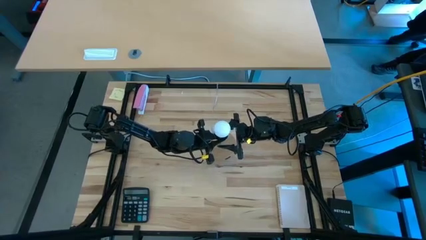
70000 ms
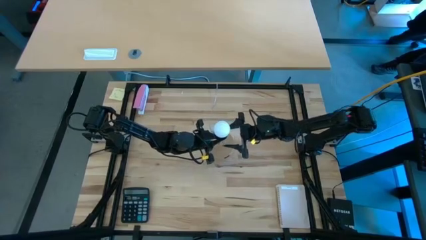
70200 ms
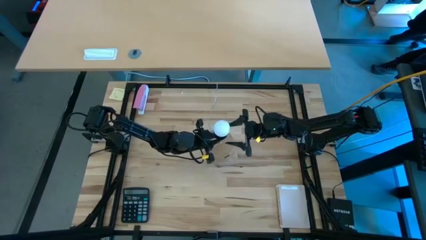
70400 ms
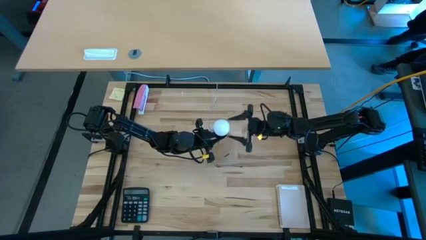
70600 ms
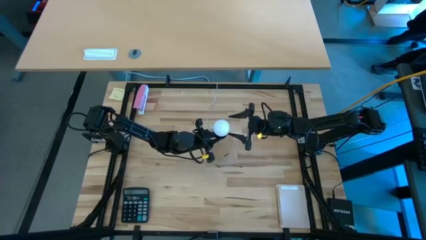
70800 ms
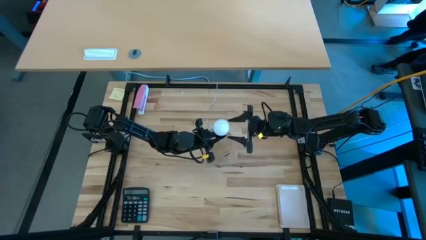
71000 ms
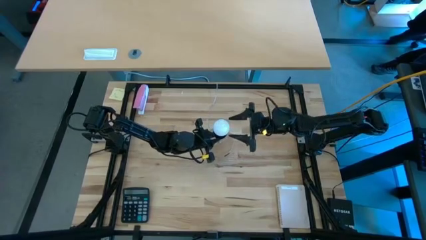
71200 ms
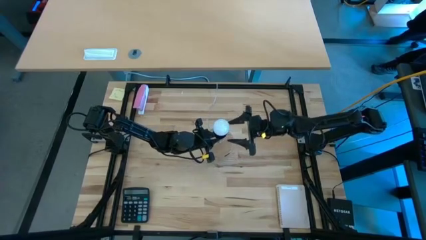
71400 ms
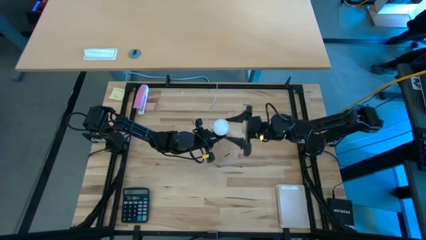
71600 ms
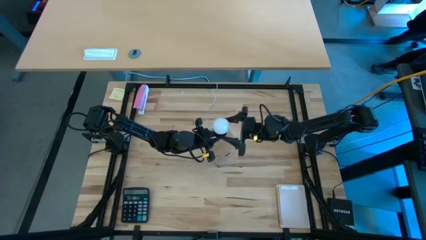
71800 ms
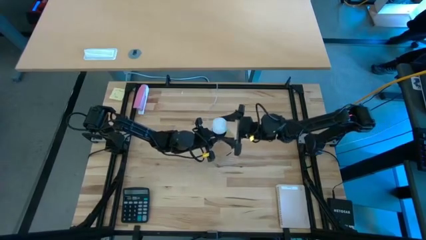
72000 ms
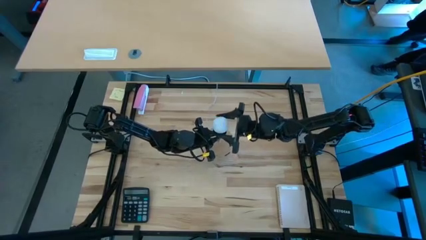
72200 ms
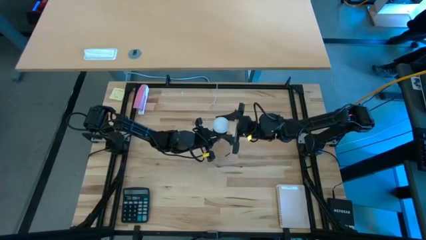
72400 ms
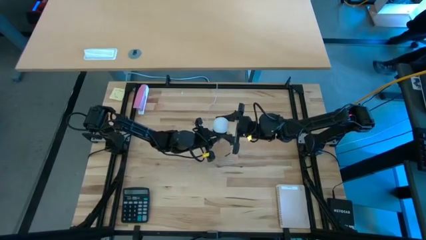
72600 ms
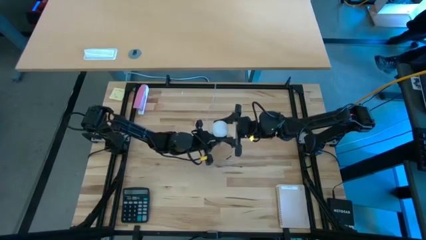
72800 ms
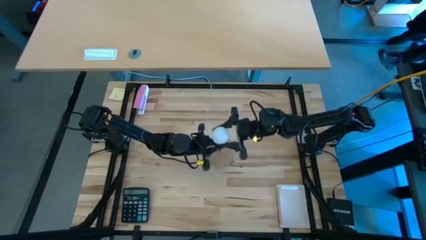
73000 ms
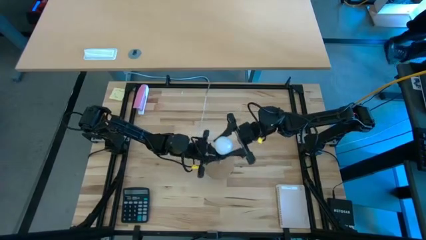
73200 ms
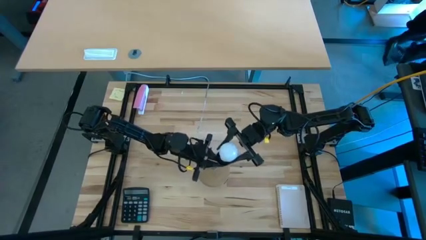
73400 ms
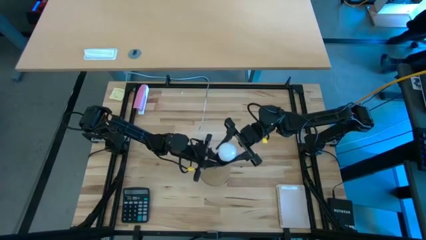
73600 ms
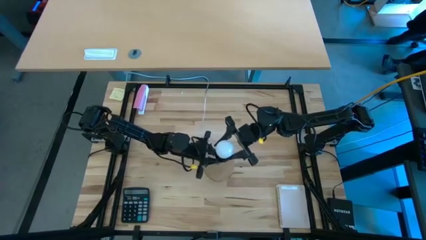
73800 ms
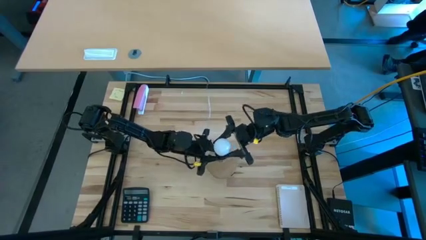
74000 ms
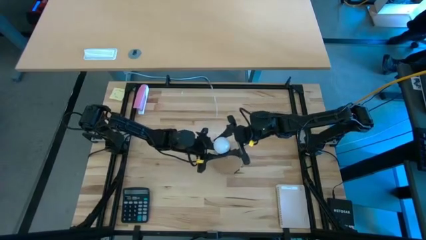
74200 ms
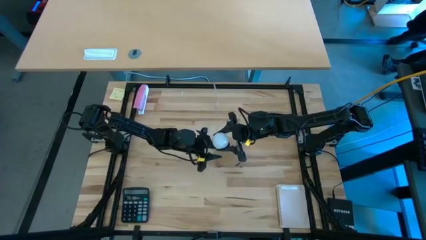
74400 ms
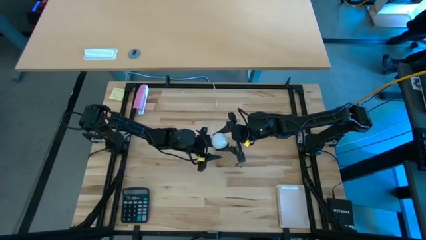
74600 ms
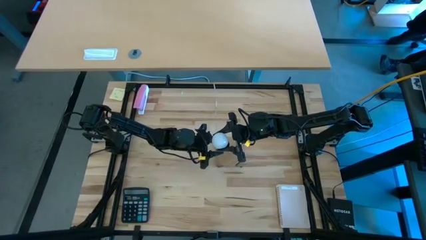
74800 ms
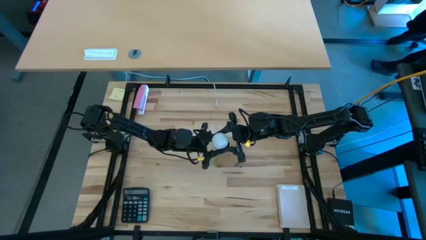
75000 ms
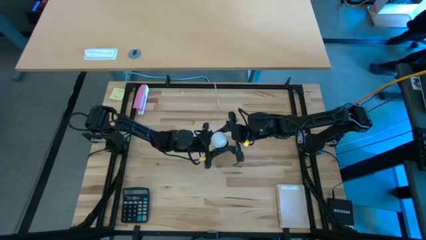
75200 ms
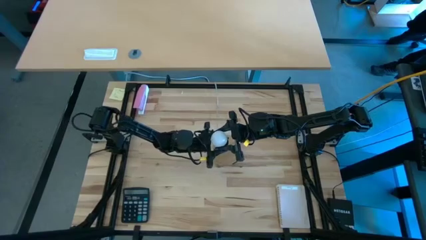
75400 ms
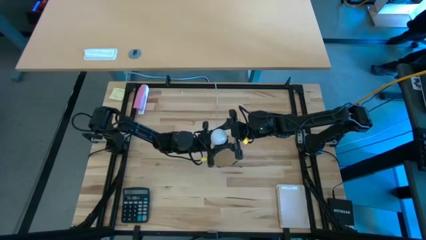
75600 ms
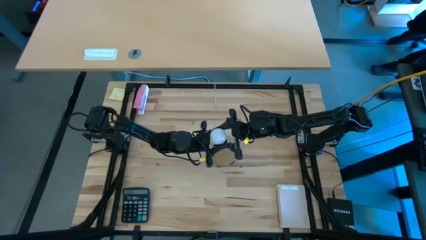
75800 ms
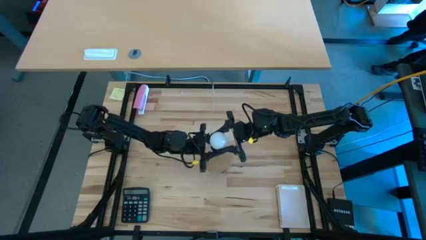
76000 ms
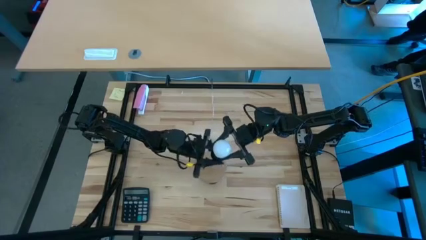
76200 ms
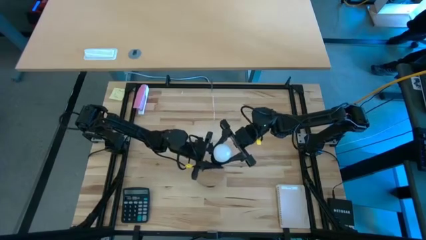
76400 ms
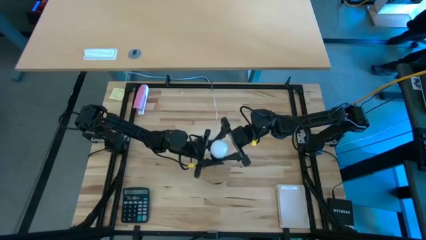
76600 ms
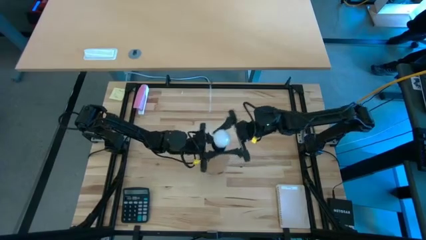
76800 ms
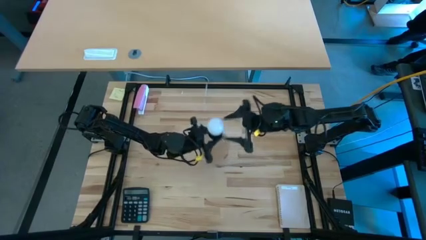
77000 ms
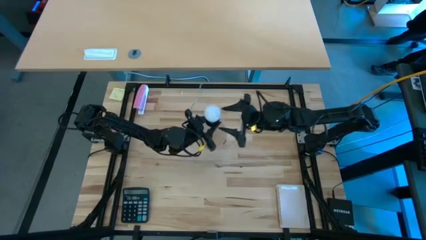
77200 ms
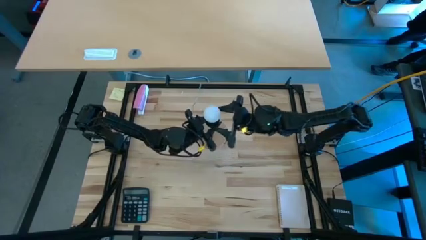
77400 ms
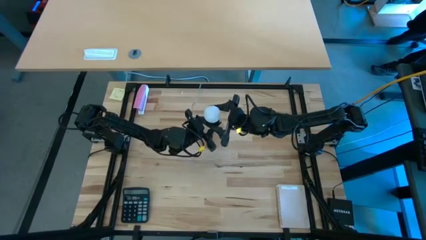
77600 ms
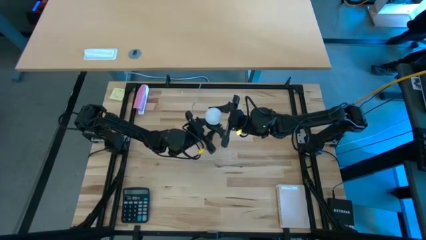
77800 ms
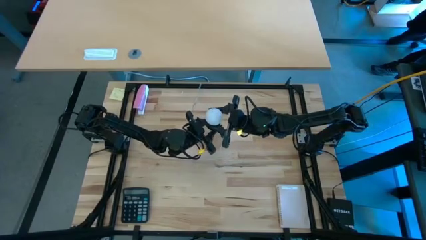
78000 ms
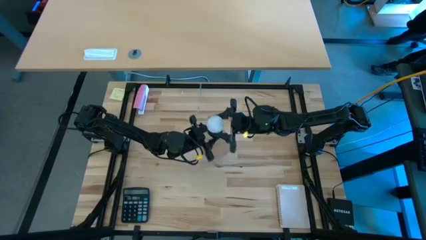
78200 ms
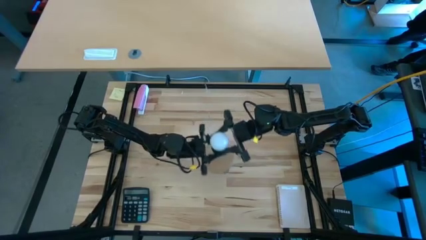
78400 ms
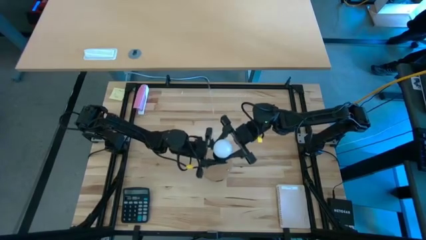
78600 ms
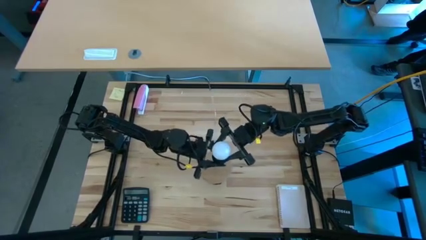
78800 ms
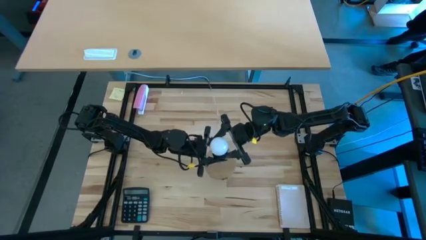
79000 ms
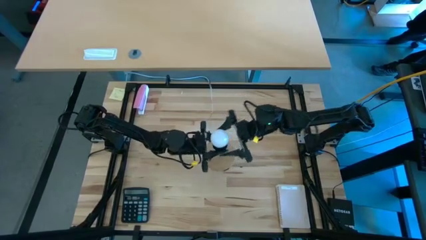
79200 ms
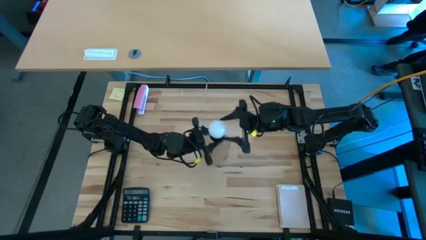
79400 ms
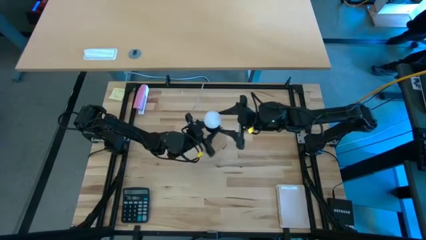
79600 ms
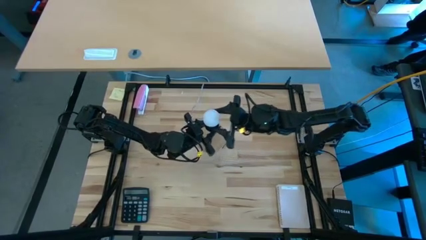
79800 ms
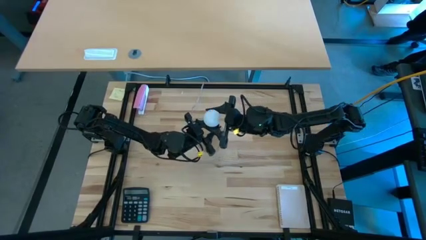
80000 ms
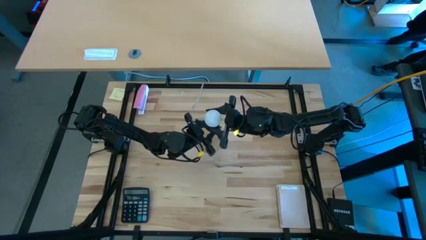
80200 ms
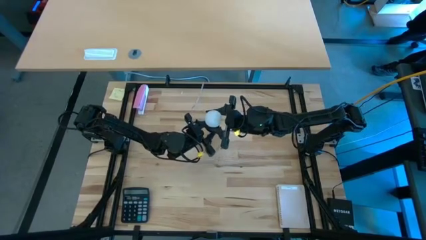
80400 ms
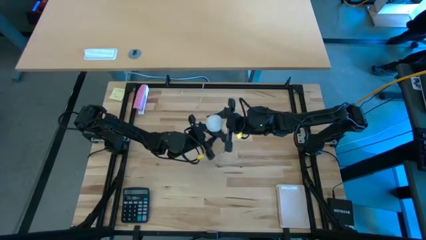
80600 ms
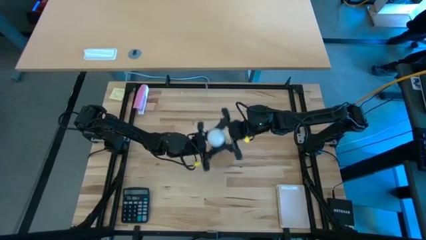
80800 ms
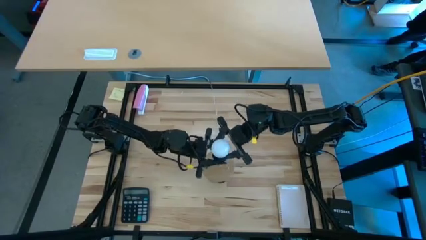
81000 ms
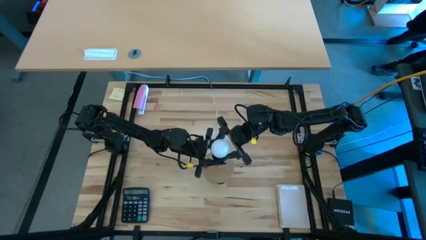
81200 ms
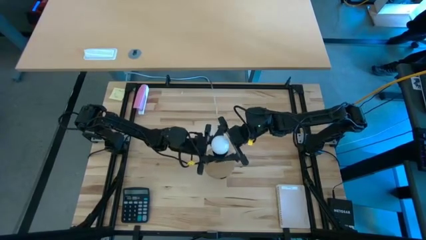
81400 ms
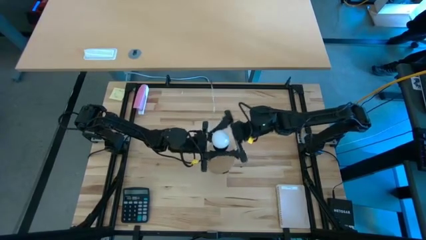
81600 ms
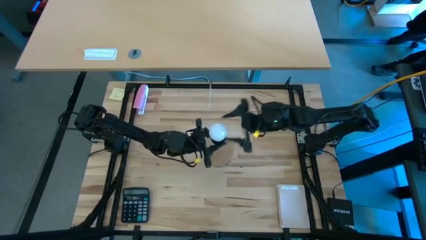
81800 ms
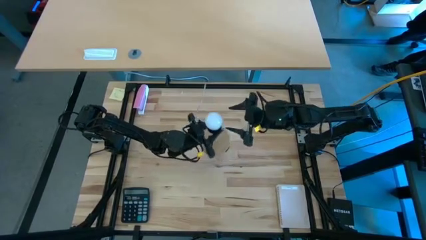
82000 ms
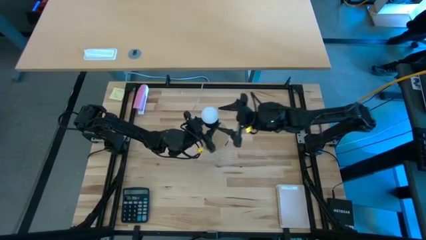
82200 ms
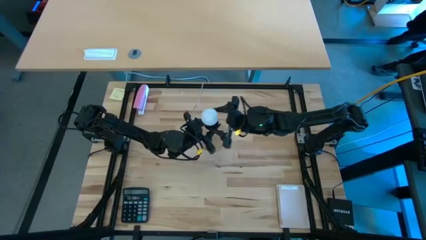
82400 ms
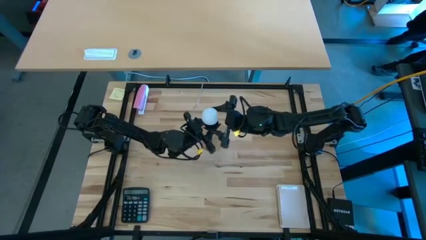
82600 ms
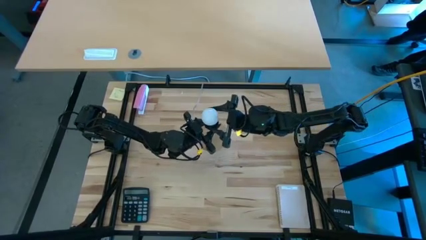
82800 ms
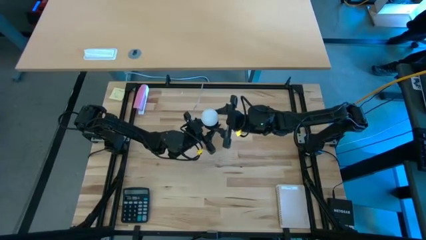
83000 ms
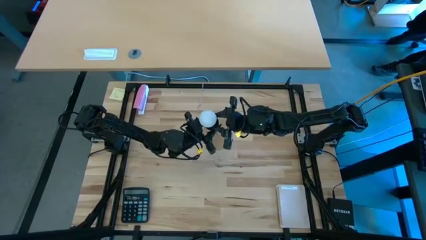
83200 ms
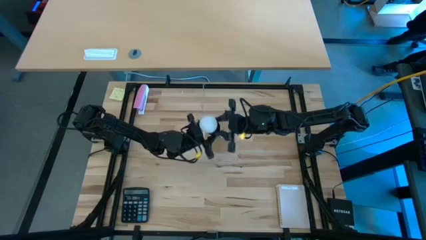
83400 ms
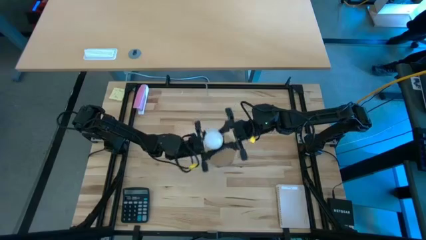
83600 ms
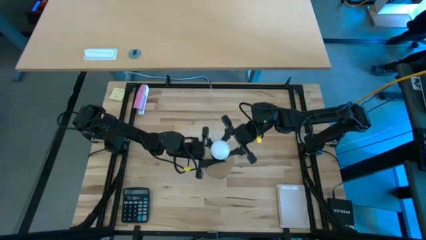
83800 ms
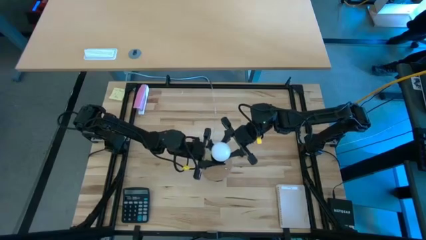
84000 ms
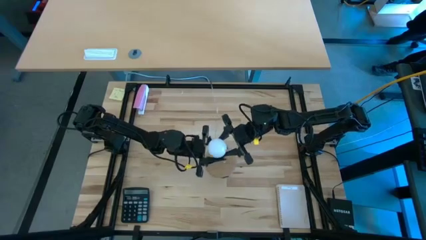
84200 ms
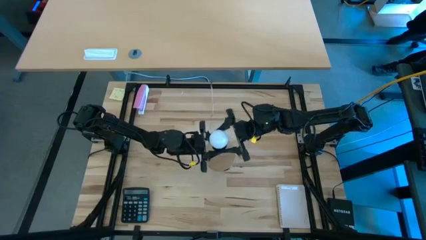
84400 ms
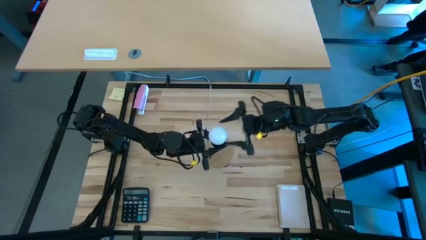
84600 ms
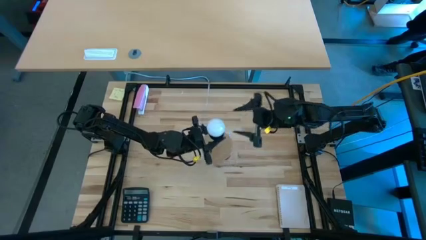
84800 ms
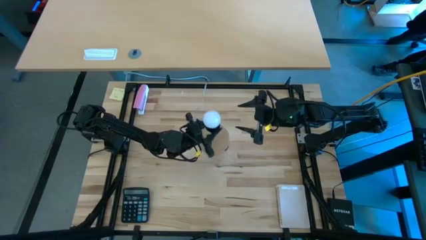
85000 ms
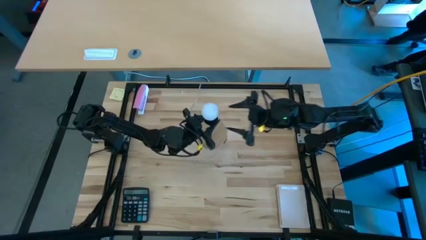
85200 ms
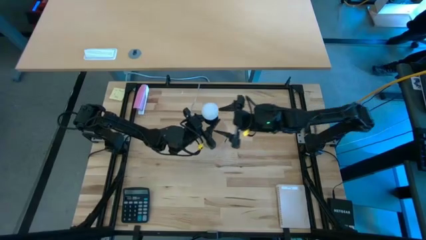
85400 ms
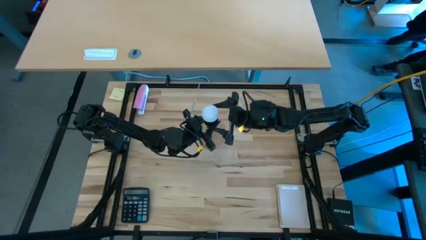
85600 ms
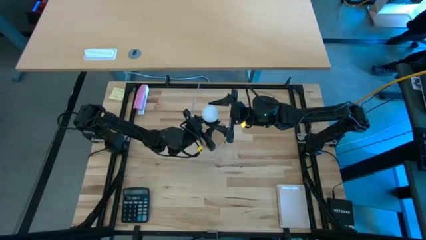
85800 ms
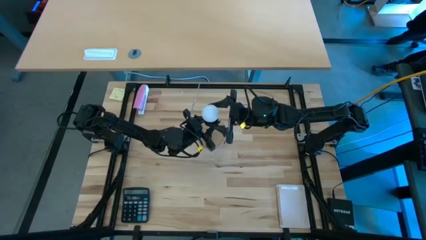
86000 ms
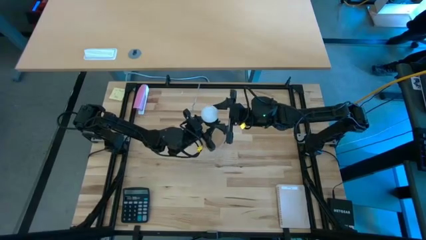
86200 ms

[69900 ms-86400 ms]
Task: Screw lightbulb
Remove the white lightbulb from the brown lamp
